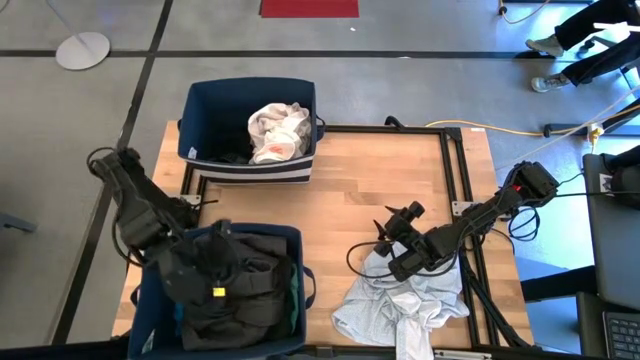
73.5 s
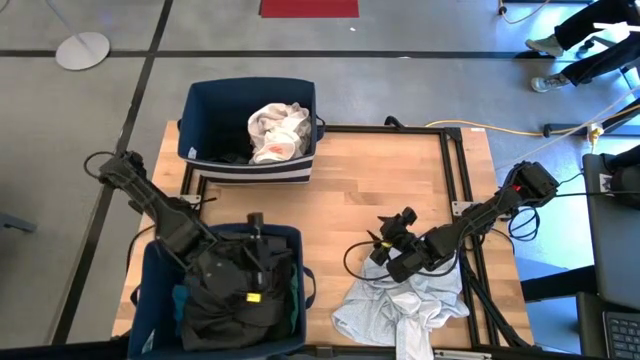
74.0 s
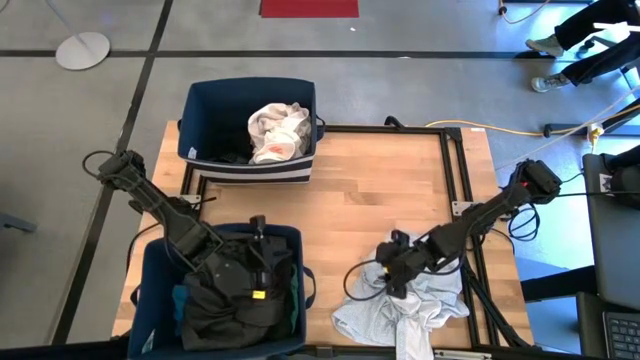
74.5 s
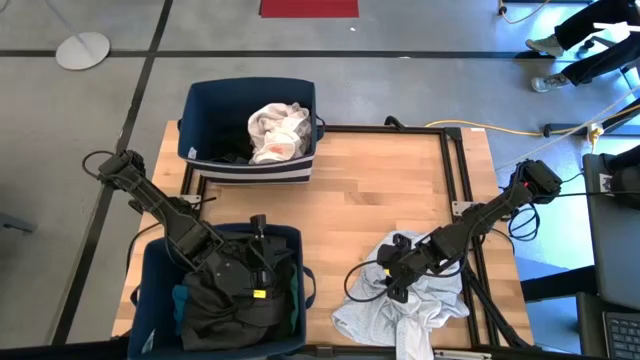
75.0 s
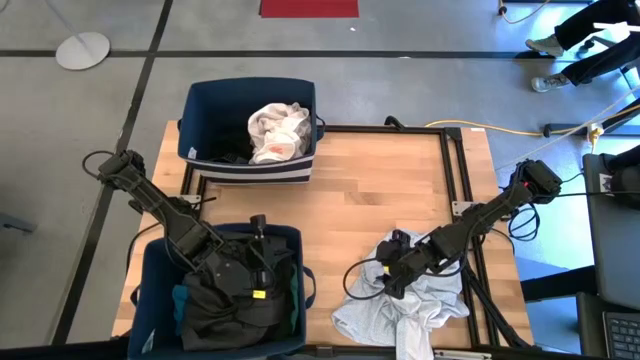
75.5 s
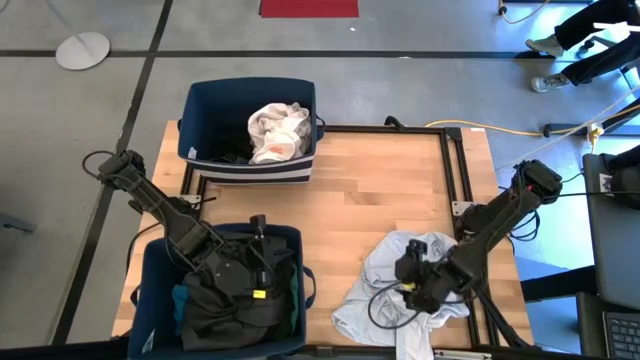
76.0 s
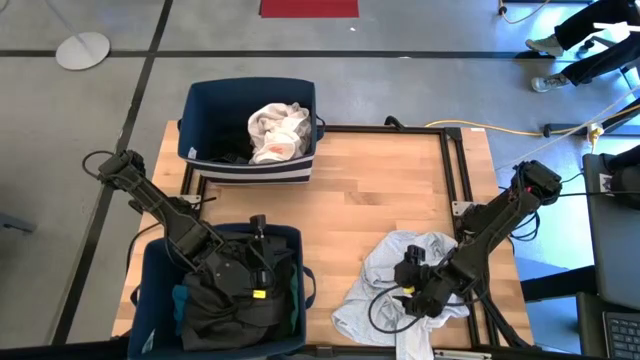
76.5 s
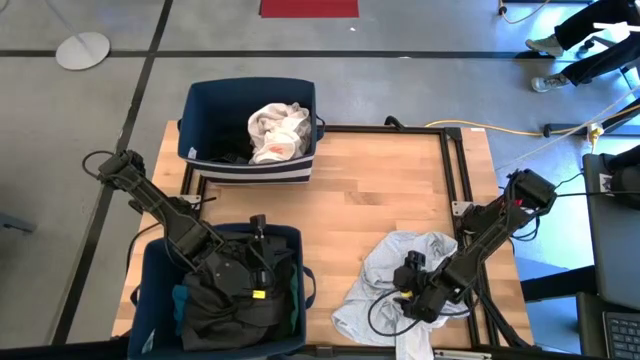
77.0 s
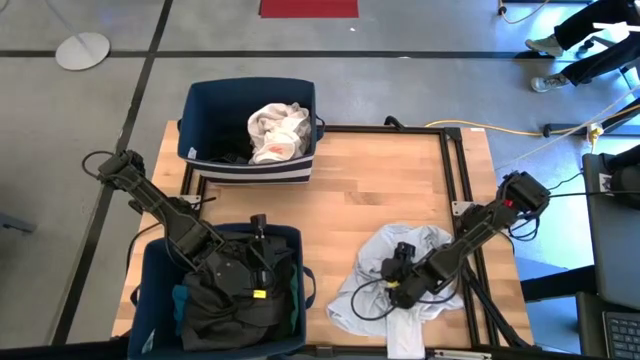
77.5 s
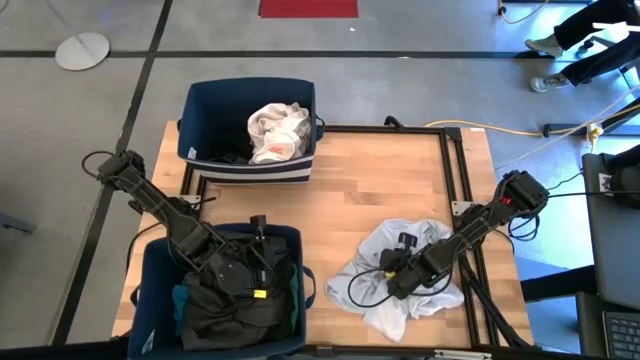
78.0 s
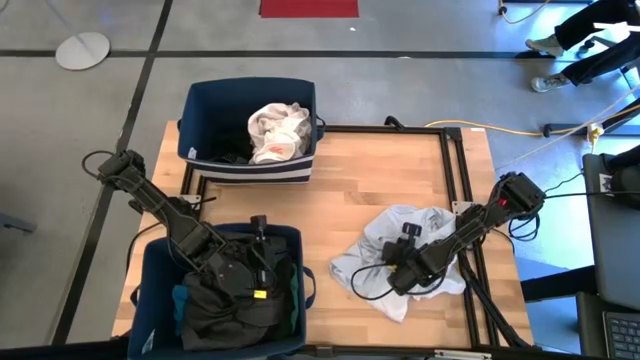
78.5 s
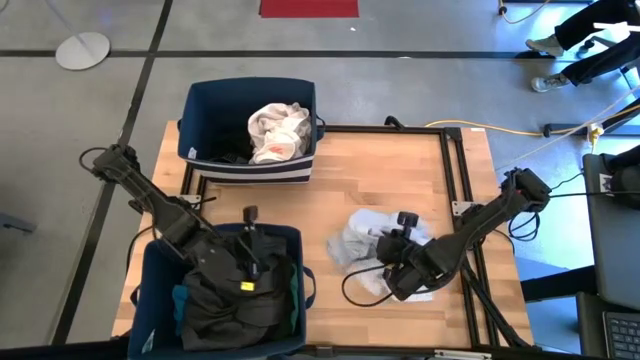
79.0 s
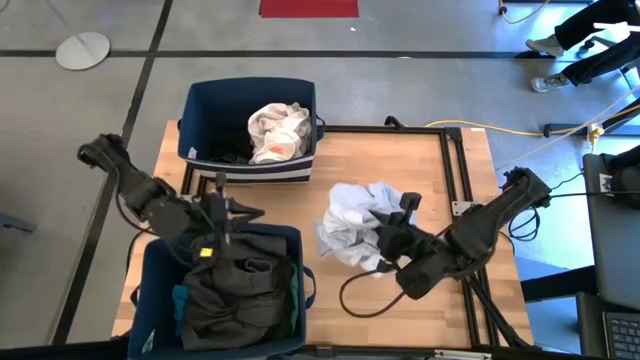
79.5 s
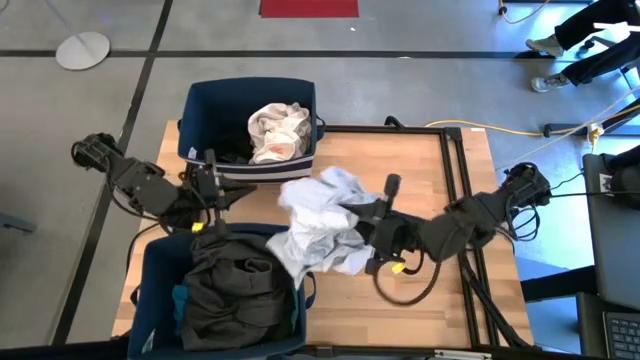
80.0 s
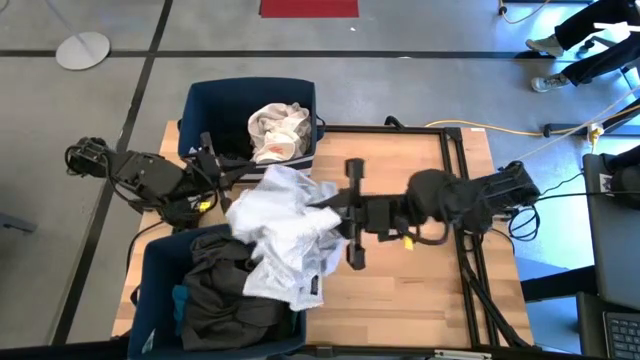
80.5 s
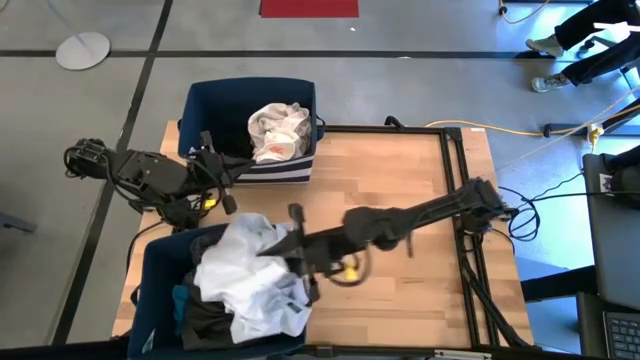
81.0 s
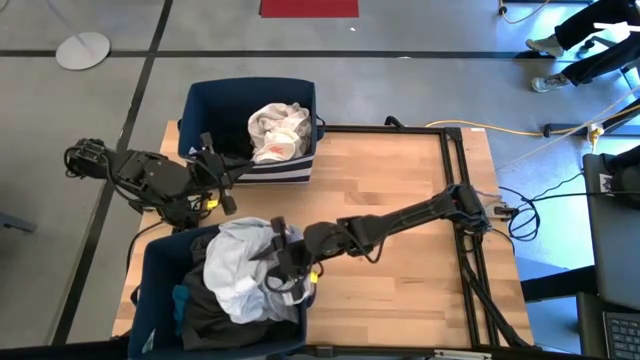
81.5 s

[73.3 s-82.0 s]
Task: Sort clothes
Put the blue patterned shirt into the bottom laundry bin

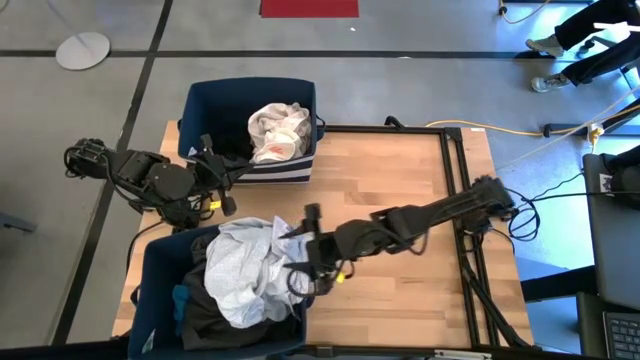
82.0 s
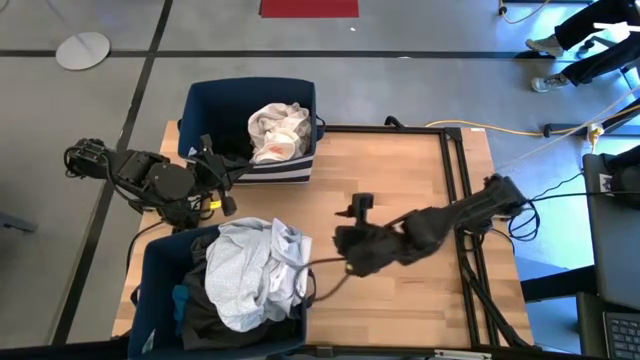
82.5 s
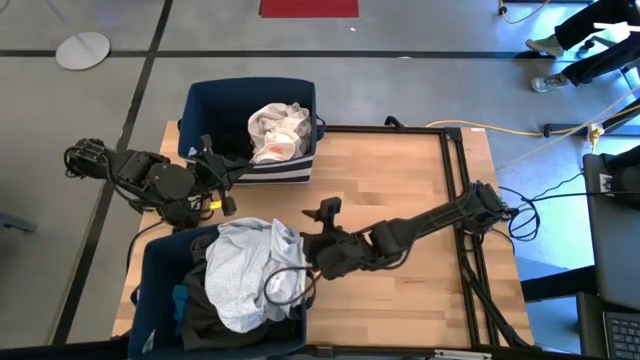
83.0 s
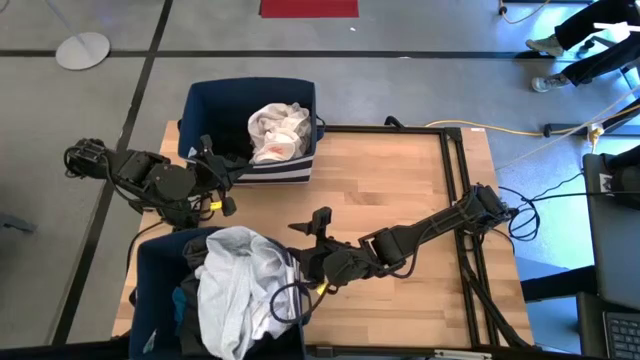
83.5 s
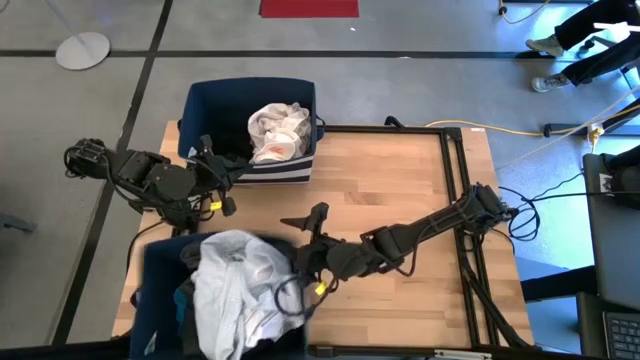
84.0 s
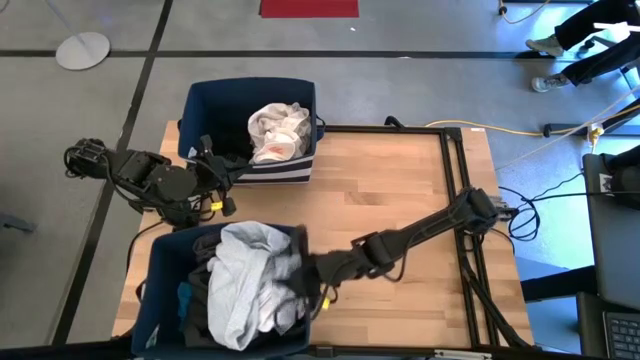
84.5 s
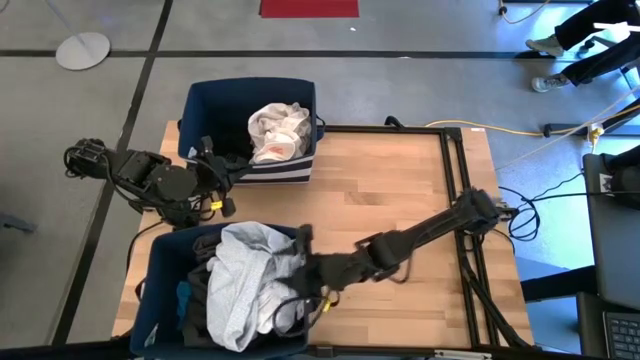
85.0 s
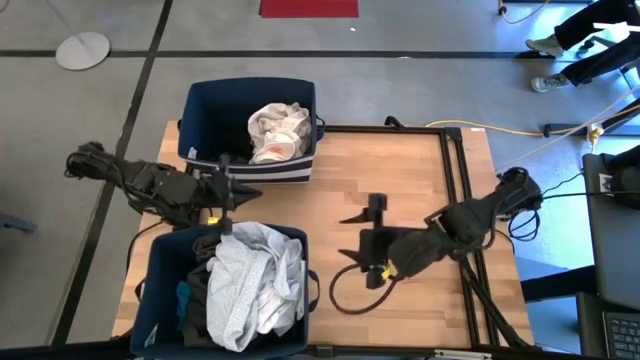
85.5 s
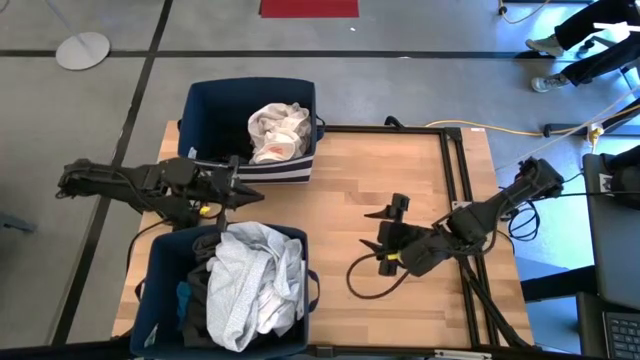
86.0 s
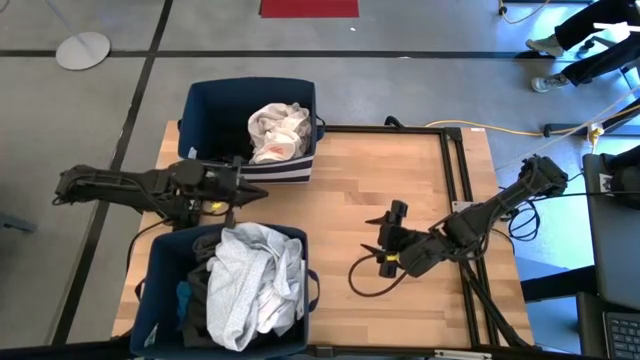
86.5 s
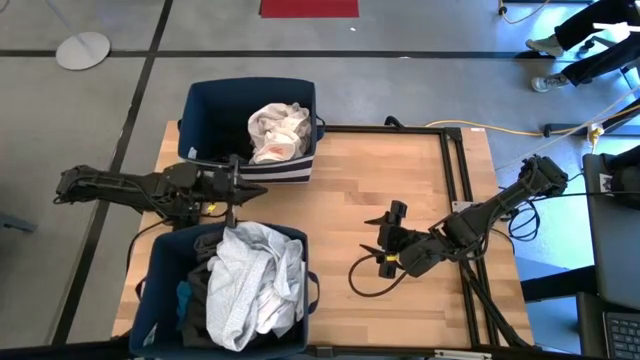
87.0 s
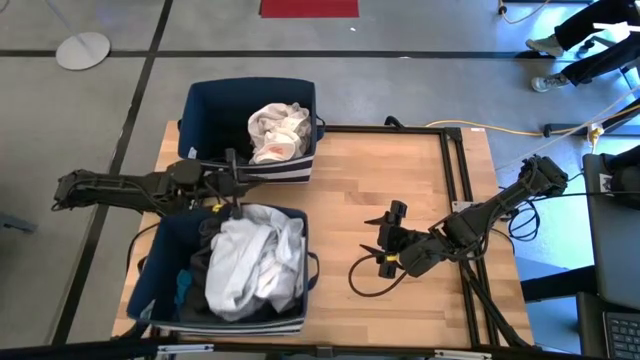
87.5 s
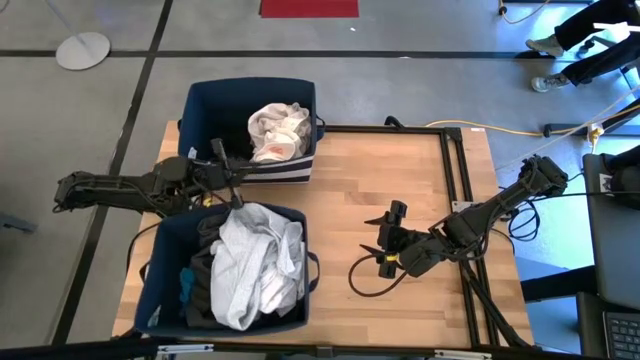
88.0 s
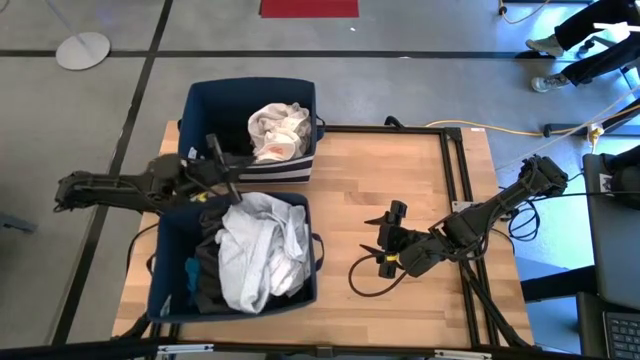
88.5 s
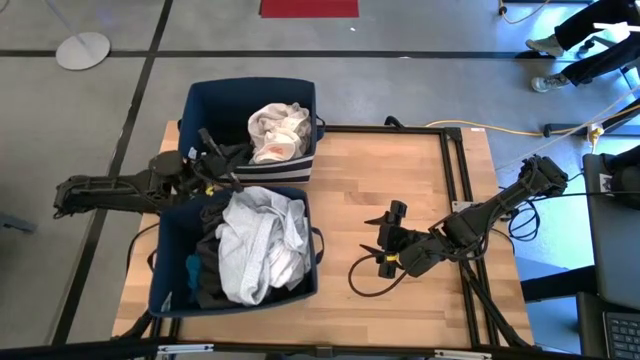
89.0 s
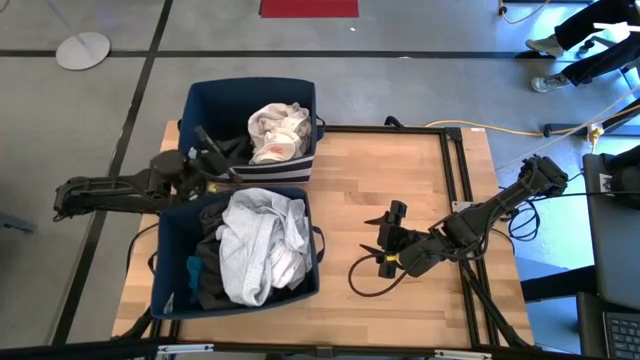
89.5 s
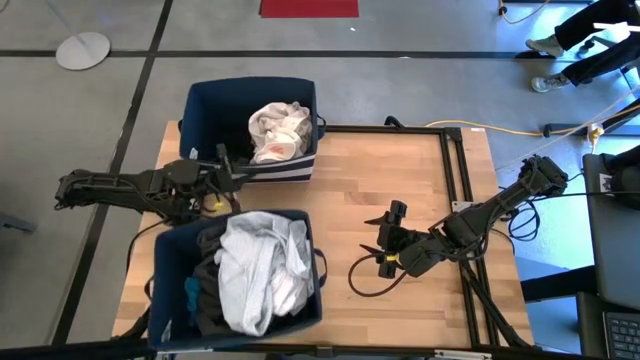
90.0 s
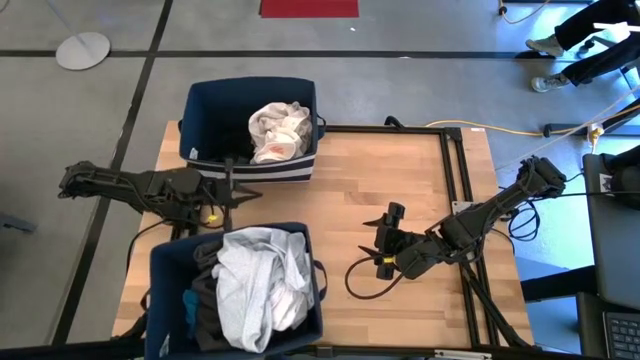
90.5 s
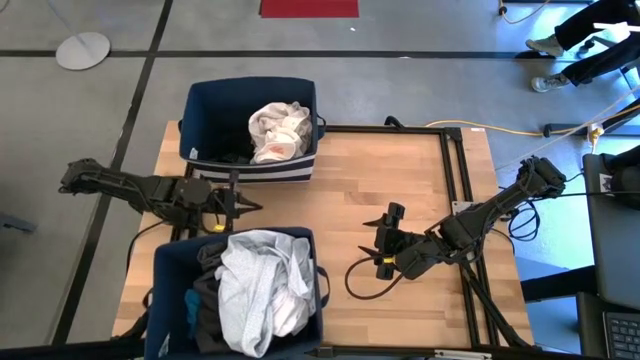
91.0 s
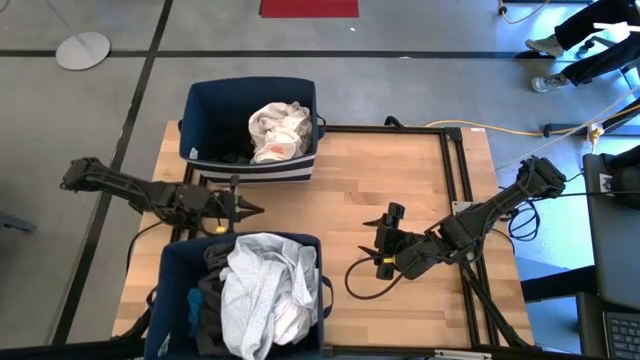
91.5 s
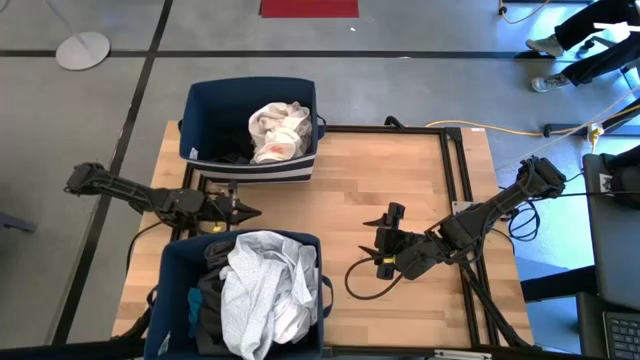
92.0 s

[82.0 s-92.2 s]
Adjust the bottom blue laundry bin

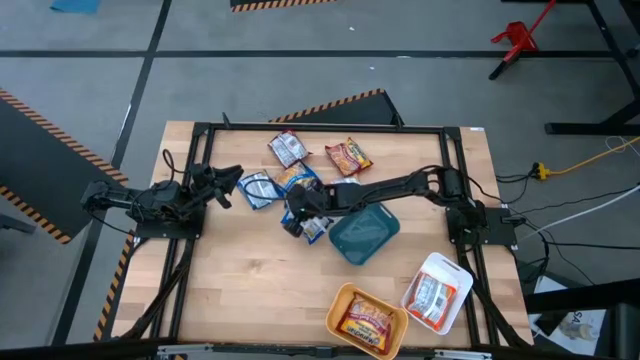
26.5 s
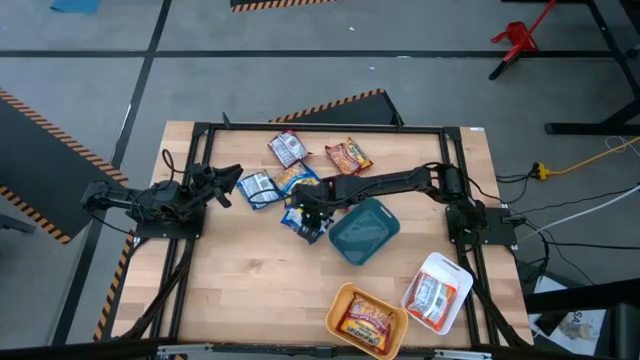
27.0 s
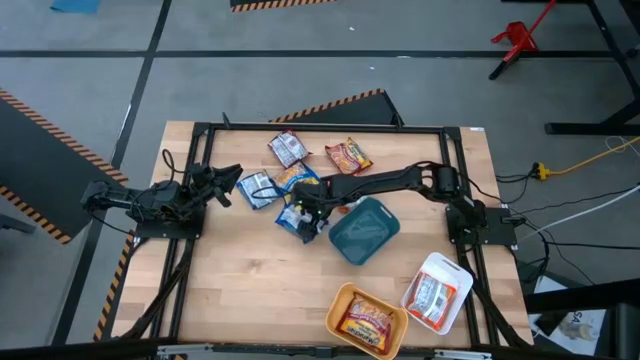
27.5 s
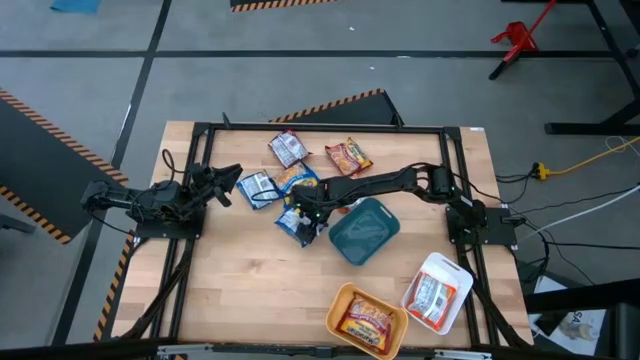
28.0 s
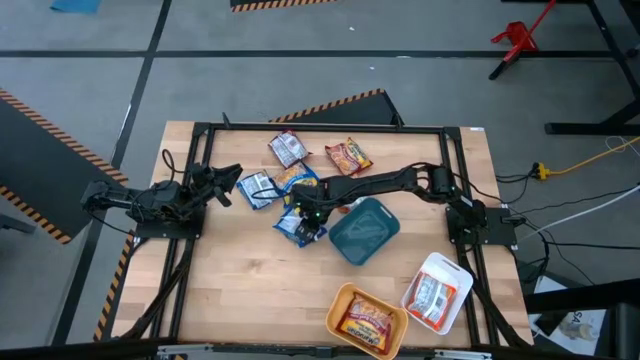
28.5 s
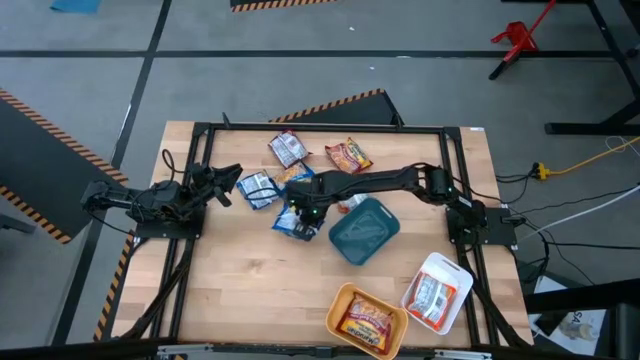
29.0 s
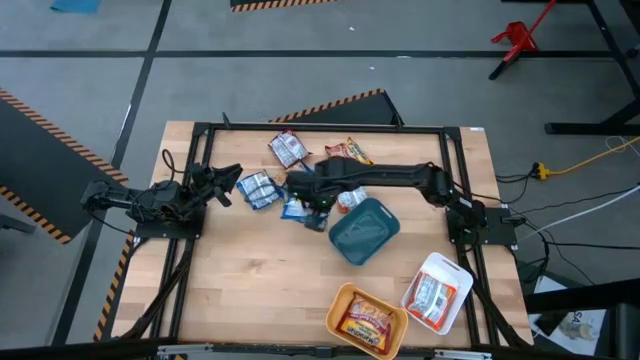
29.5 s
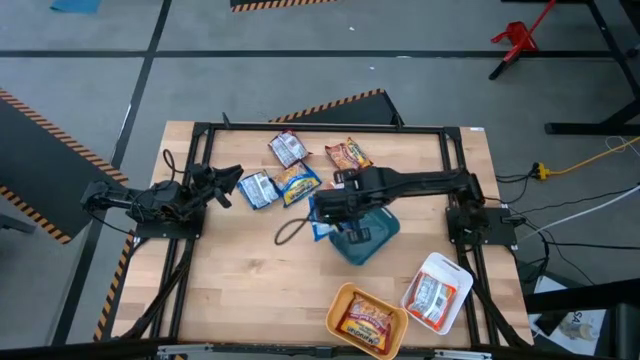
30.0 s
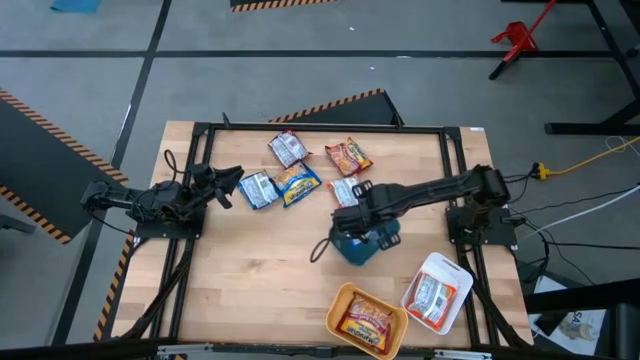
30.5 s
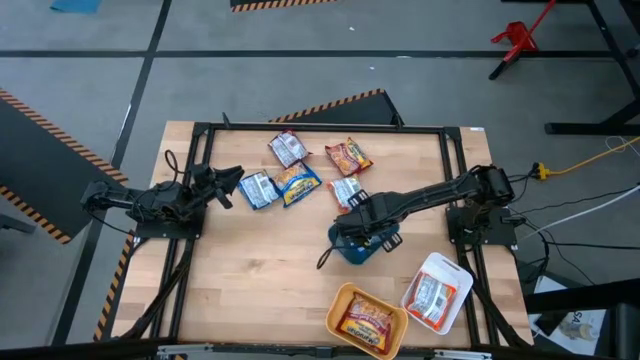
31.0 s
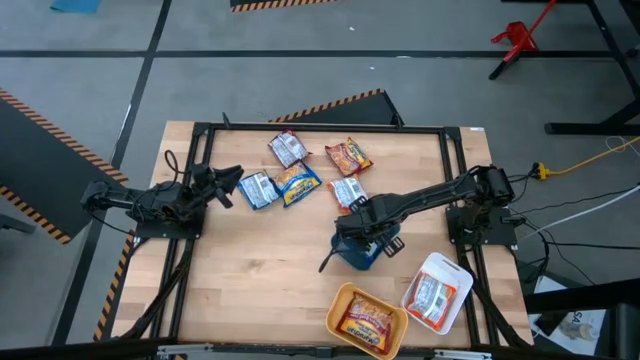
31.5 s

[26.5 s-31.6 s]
Task: Sort Maruchan noodles
Put the top blue noodle pack into the green bin
